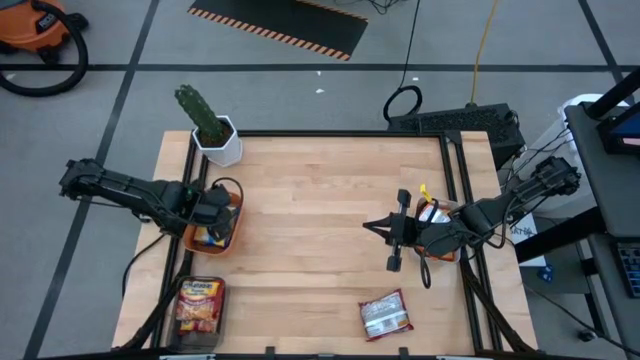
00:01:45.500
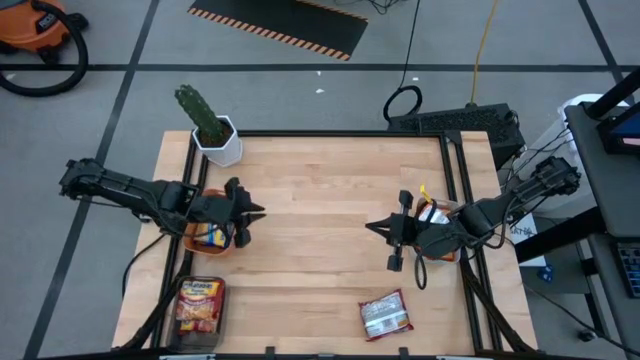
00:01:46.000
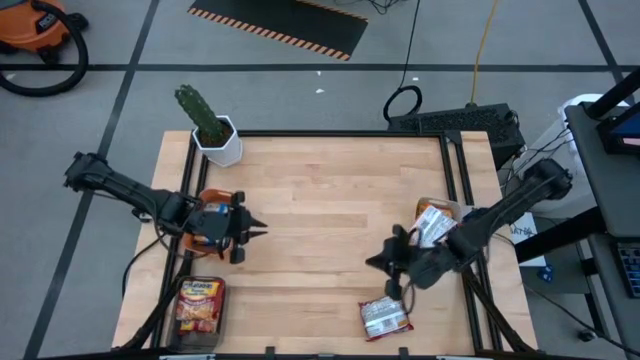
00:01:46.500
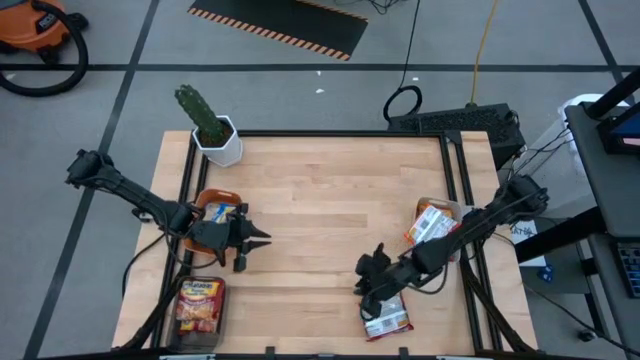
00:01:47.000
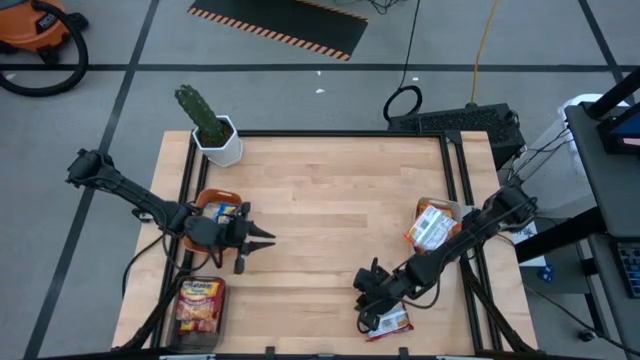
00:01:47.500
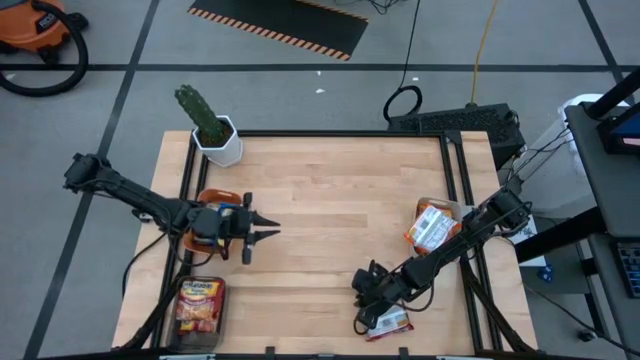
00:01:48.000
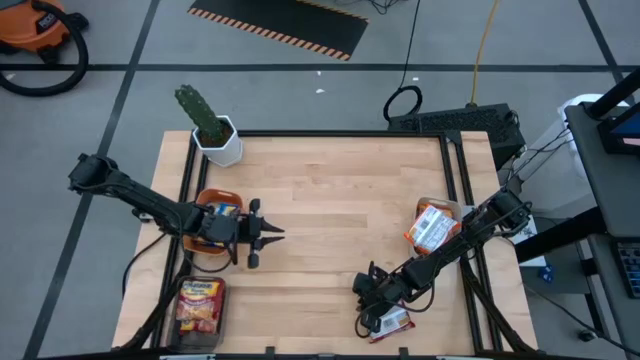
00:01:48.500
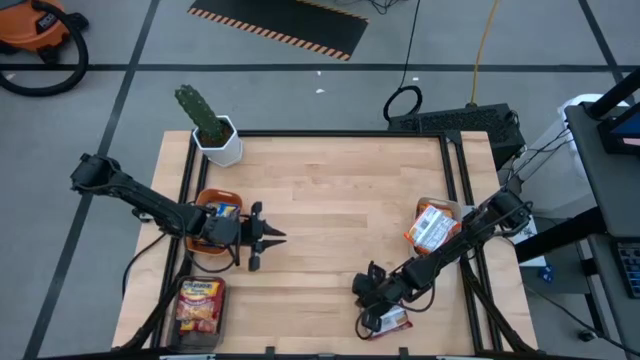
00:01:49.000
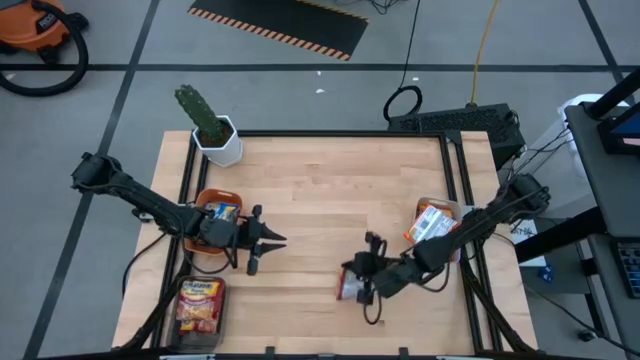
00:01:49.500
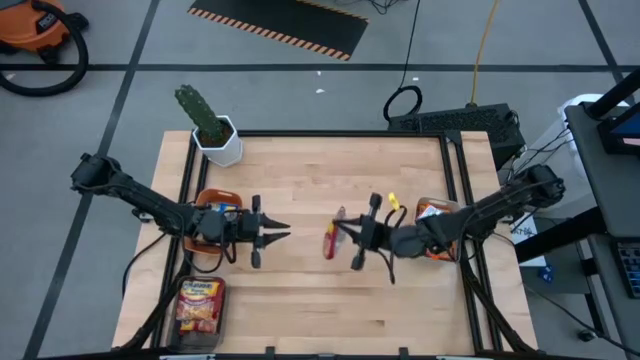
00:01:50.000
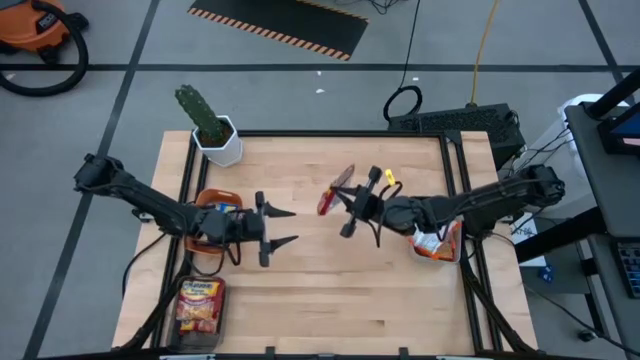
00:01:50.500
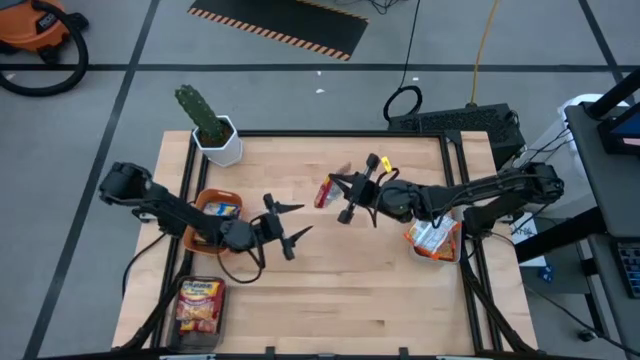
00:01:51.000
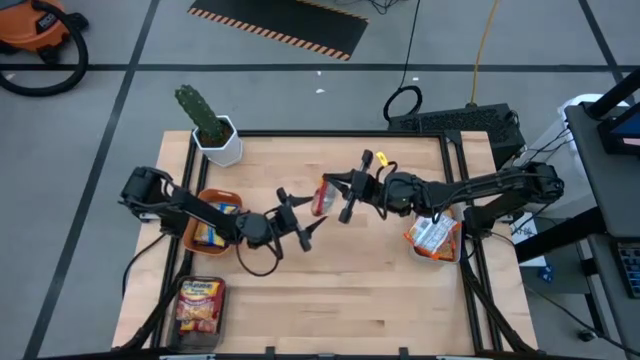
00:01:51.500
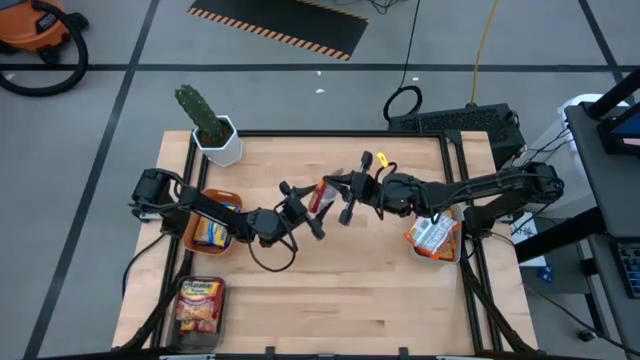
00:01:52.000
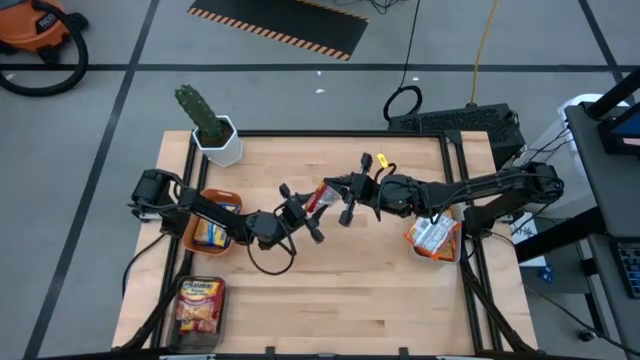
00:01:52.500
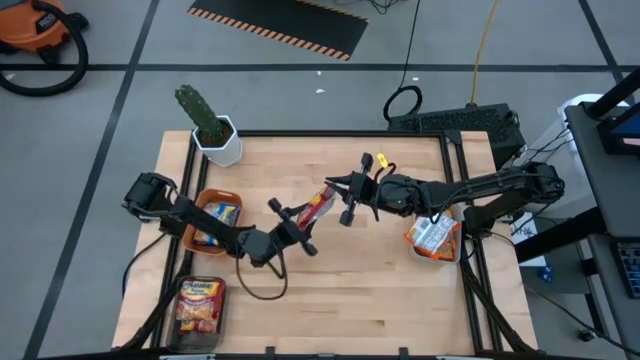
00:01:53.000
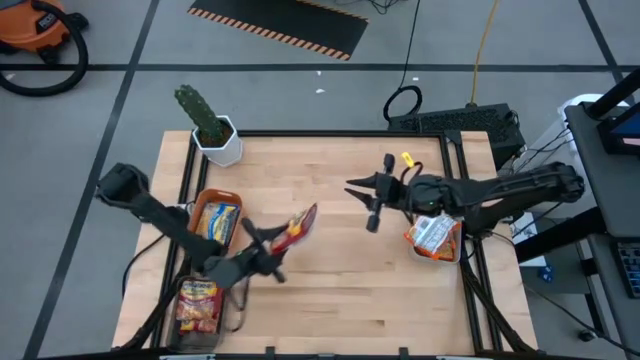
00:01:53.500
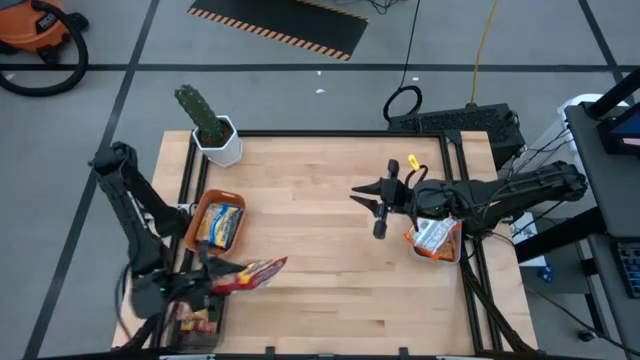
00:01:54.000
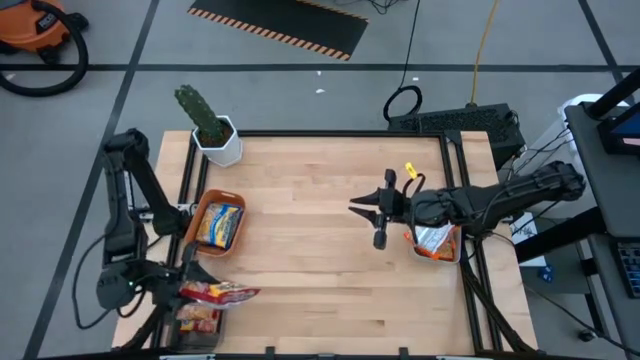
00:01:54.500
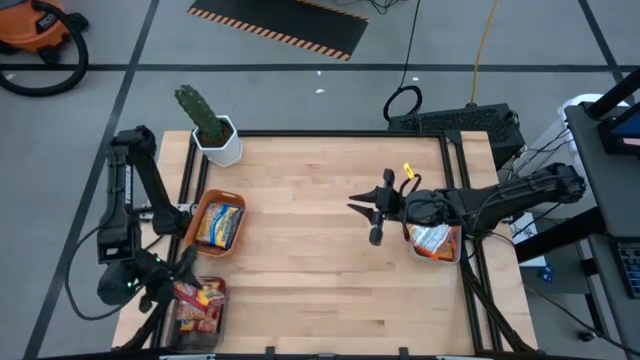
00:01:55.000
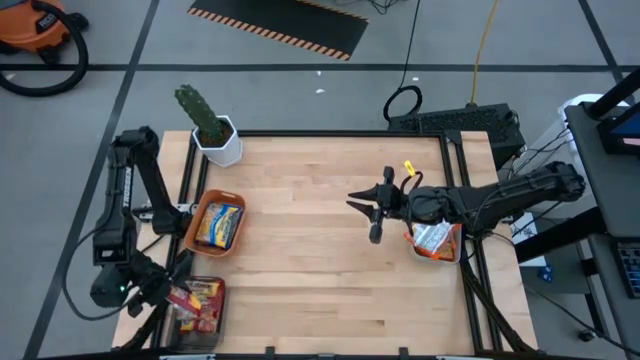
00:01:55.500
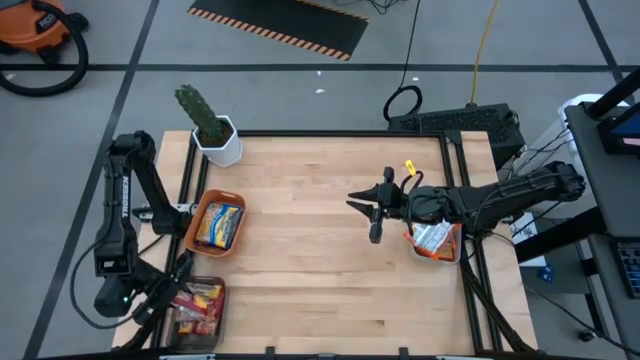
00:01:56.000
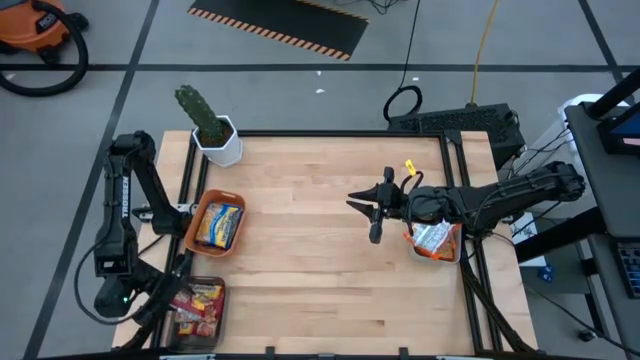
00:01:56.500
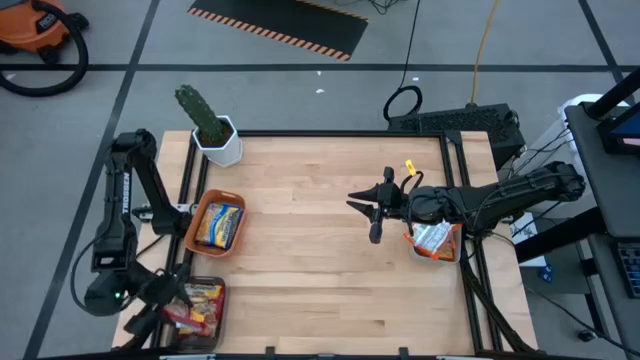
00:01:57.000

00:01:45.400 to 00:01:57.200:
Task: Sort Maruchan noodles
Put the red noodle pack into the black bin

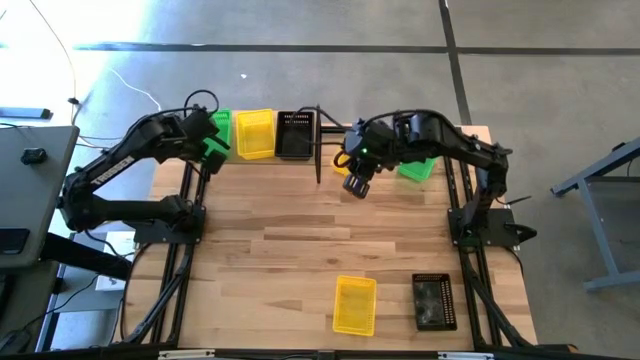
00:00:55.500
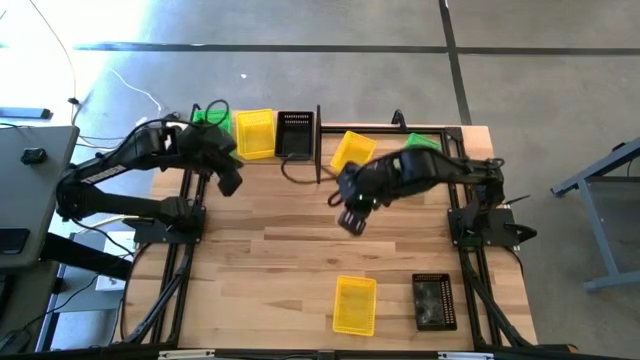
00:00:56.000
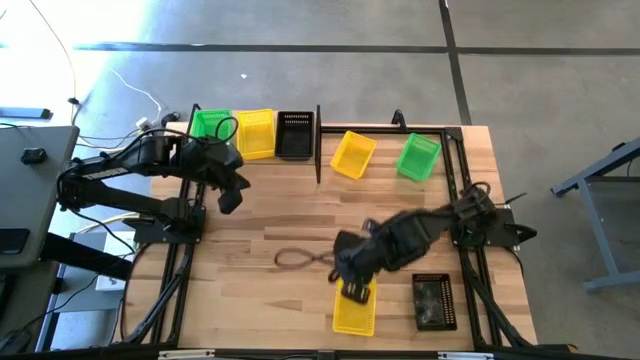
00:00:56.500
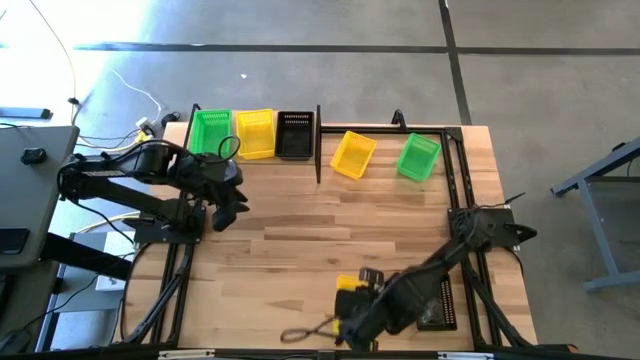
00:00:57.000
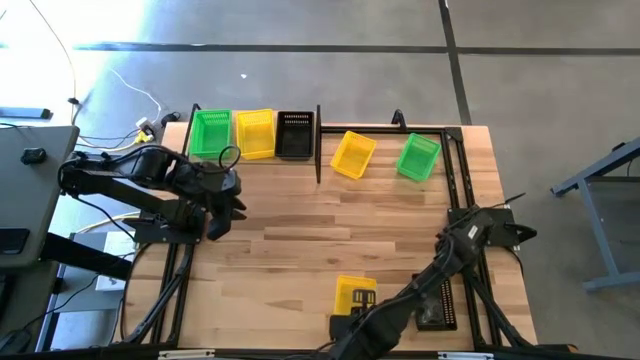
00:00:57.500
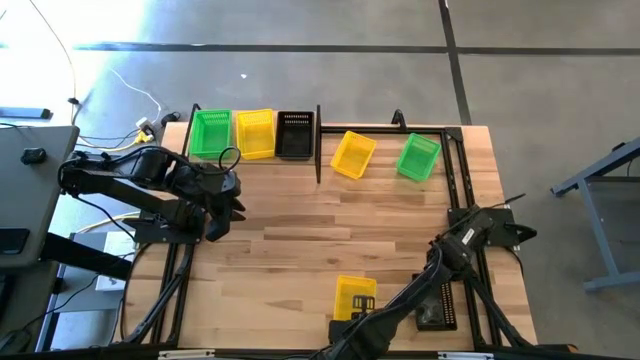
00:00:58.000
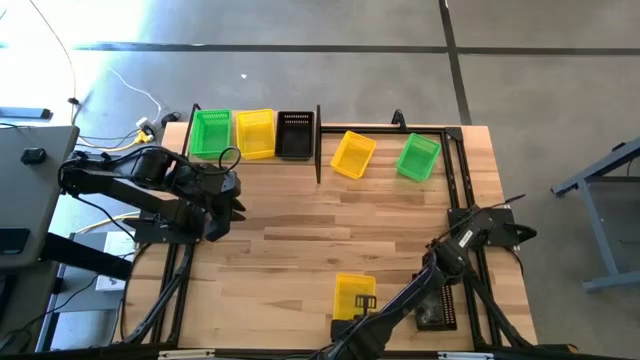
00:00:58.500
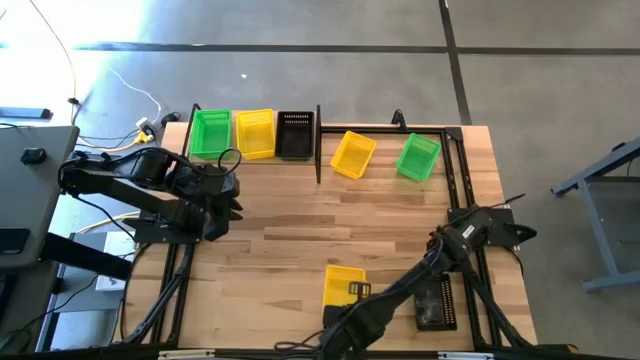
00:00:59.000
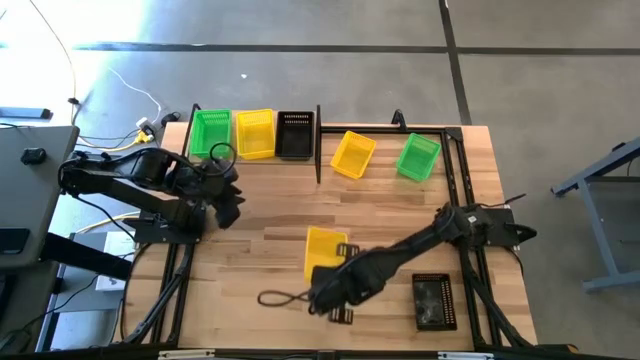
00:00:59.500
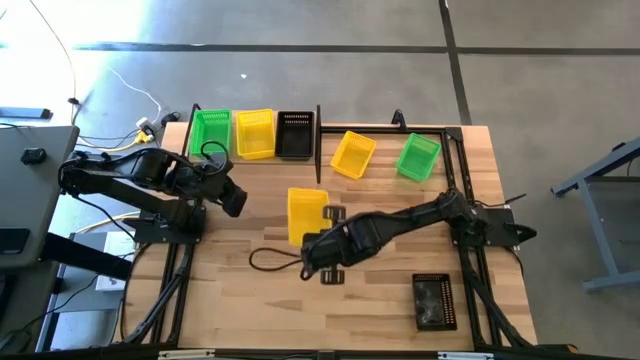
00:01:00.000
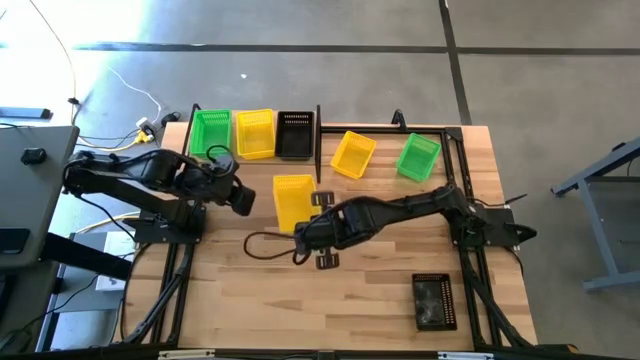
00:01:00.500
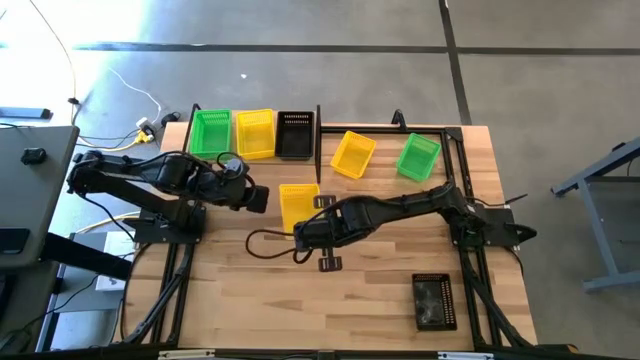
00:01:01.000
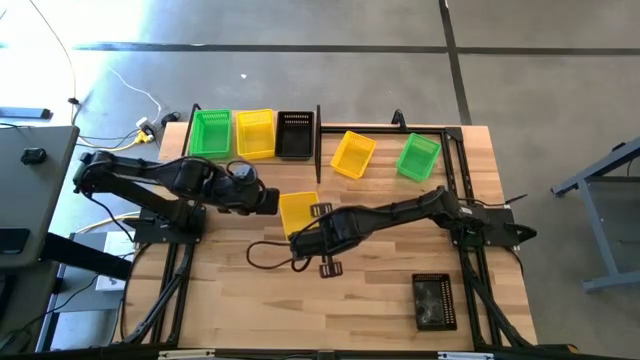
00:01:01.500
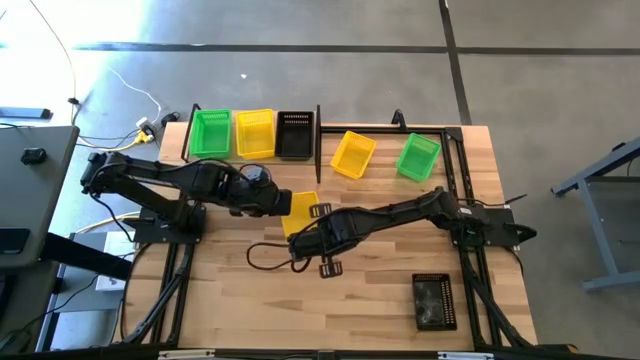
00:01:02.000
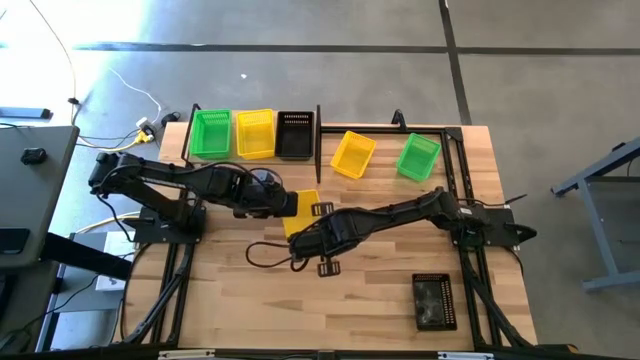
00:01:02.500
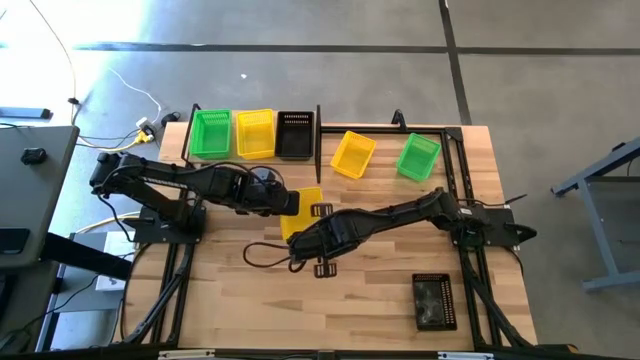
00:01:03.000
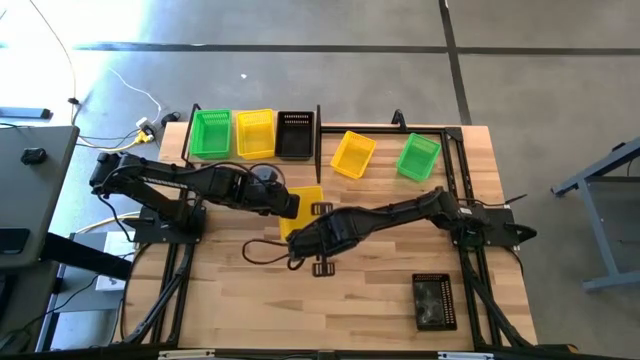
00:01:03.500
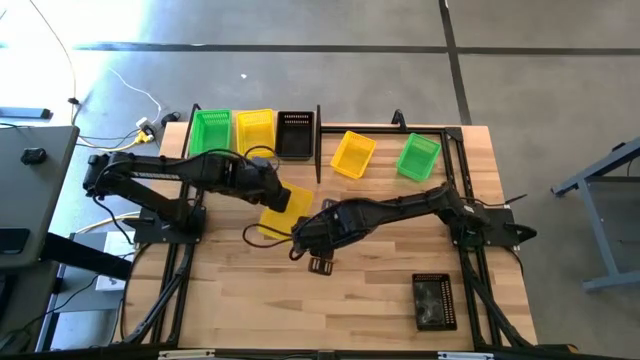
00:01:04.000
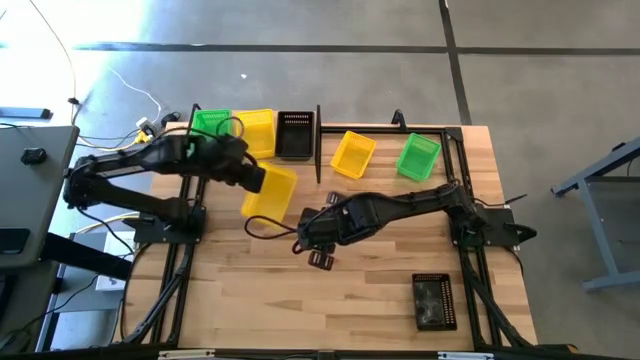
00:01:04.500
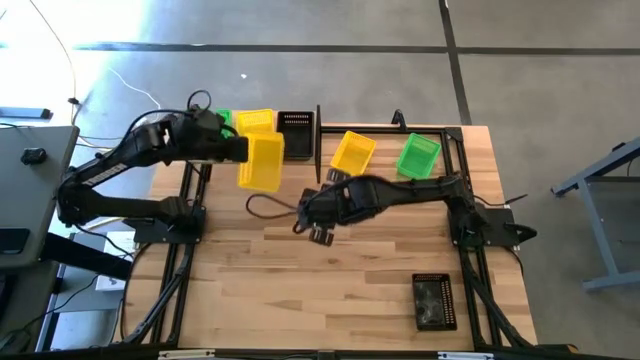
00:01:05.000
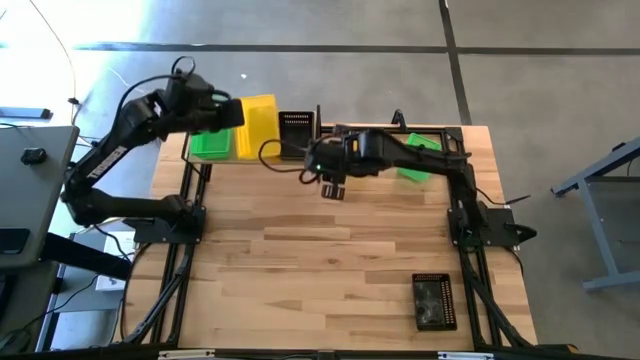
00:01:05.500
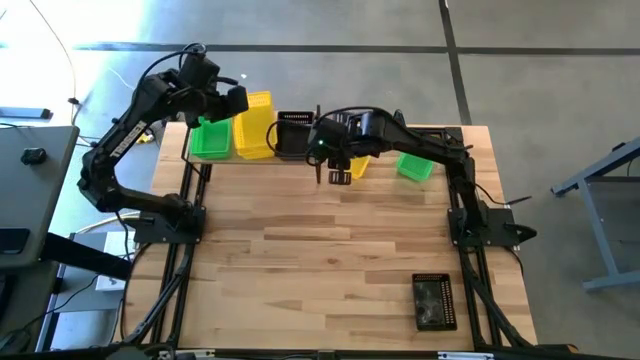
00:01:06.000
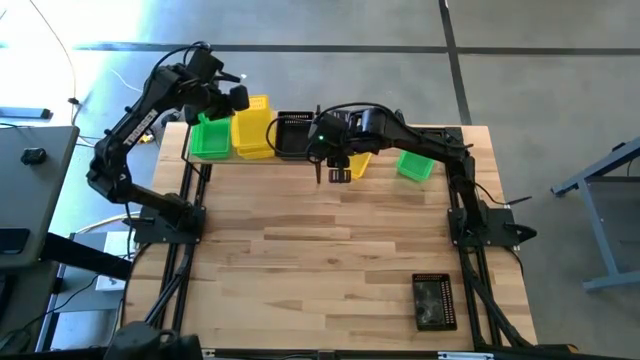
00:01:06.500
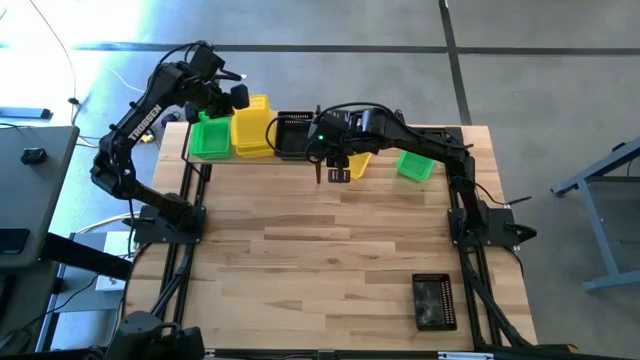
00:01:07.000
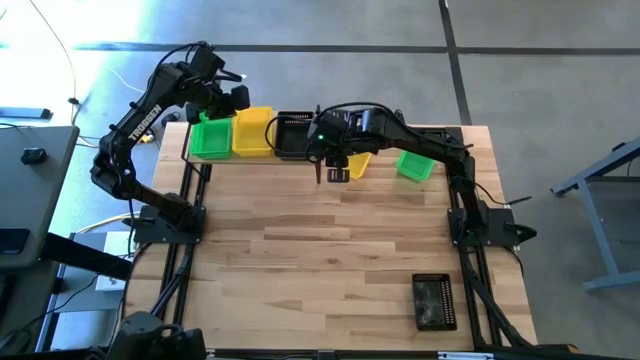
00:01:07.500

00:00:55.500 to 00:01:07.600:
Task: Stack baskets on shelf by color
Stack the bottom yellow bin on top of the yellow bin on the shelf
